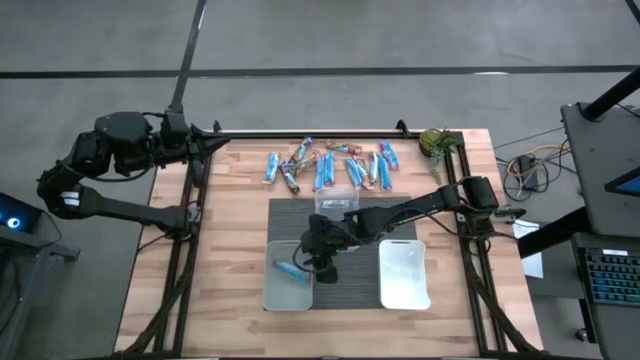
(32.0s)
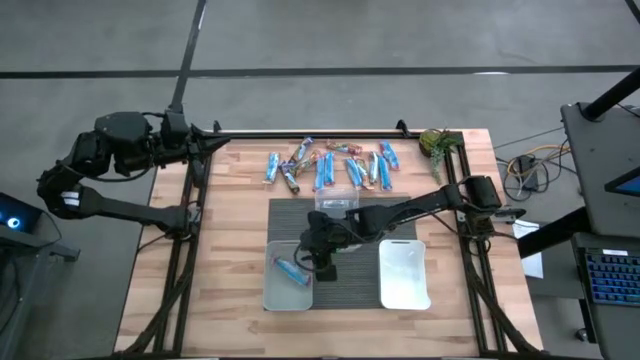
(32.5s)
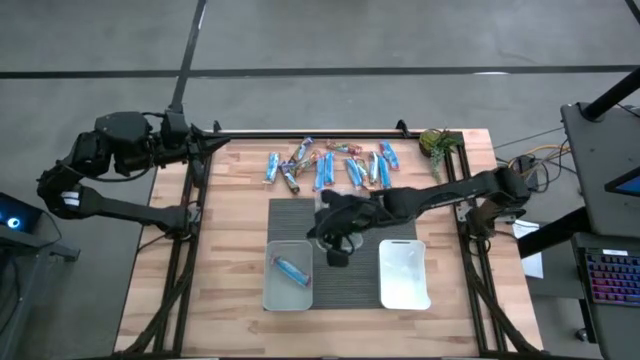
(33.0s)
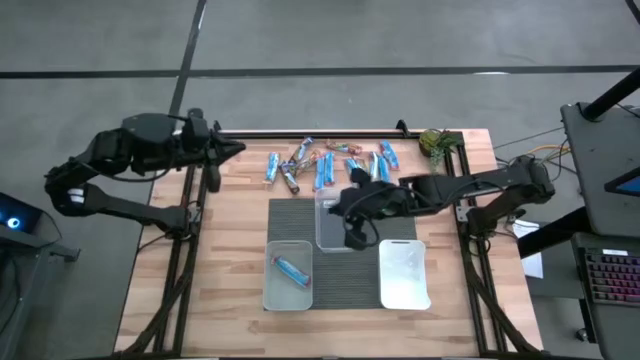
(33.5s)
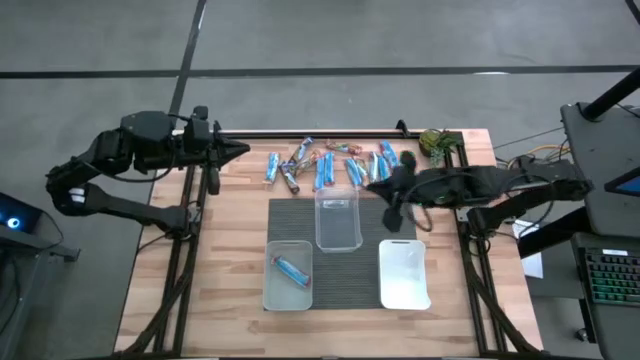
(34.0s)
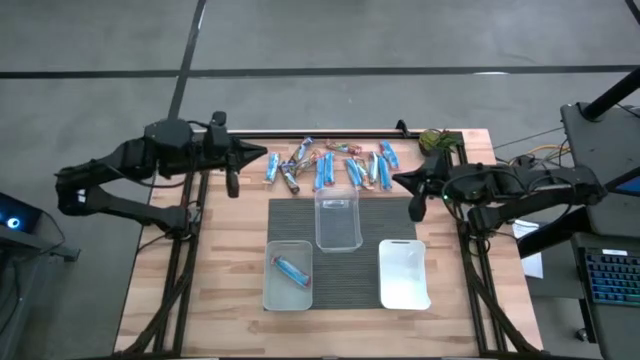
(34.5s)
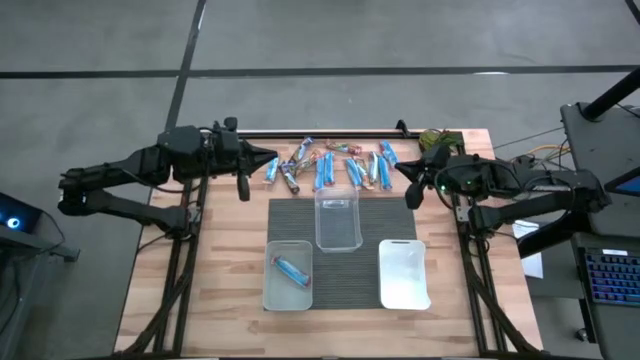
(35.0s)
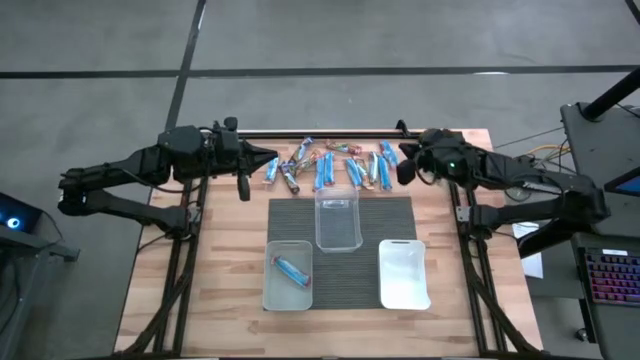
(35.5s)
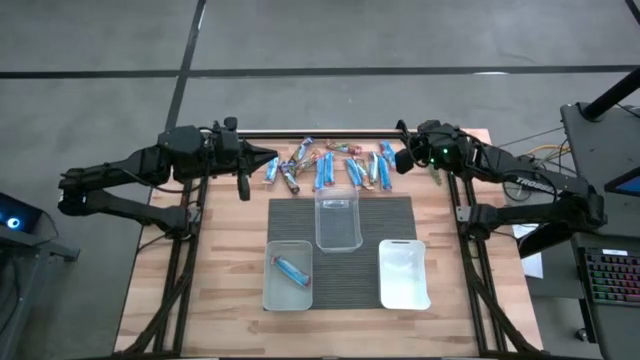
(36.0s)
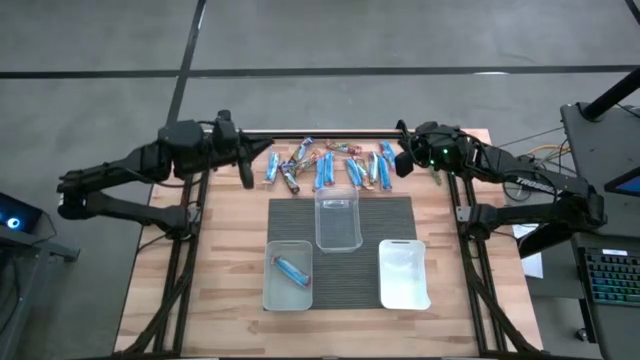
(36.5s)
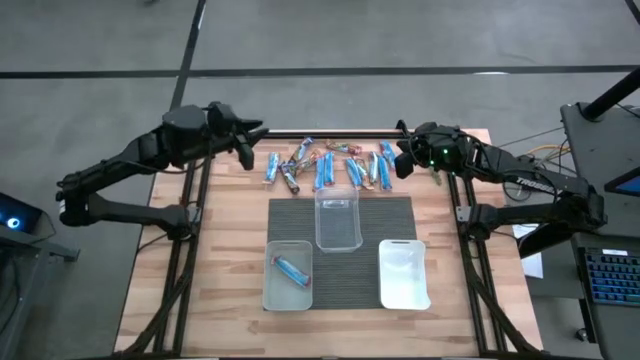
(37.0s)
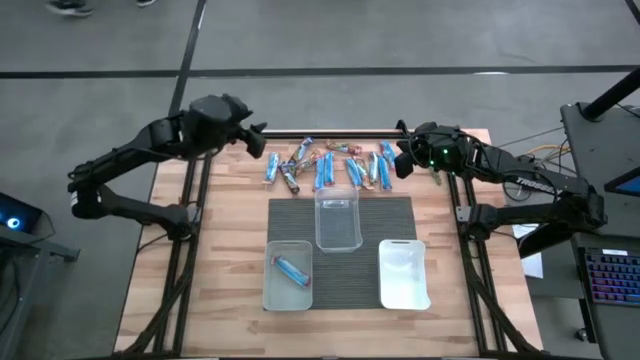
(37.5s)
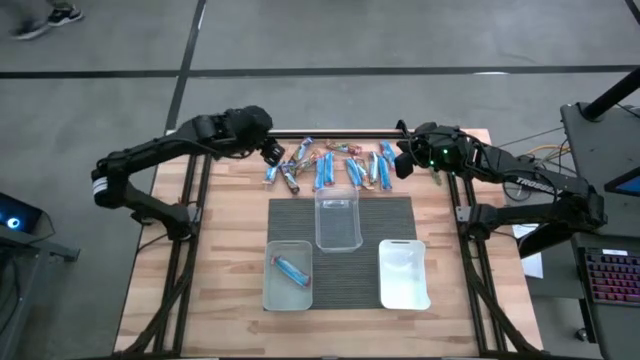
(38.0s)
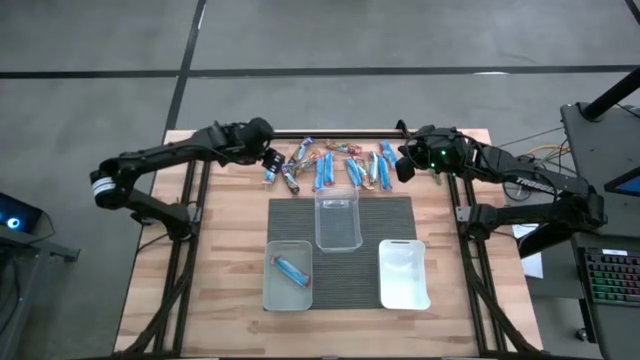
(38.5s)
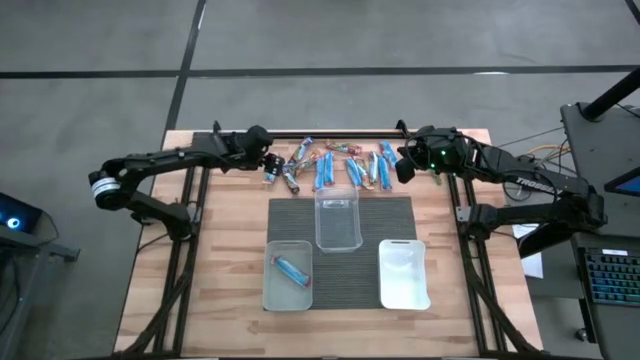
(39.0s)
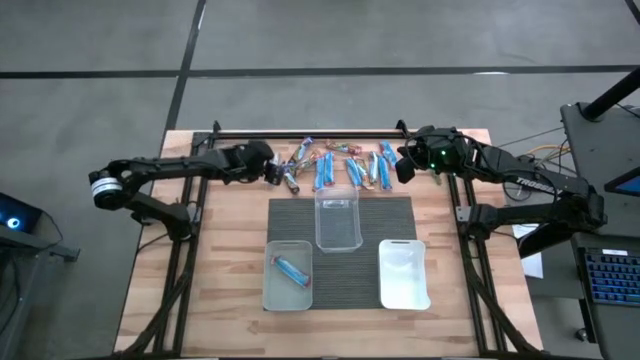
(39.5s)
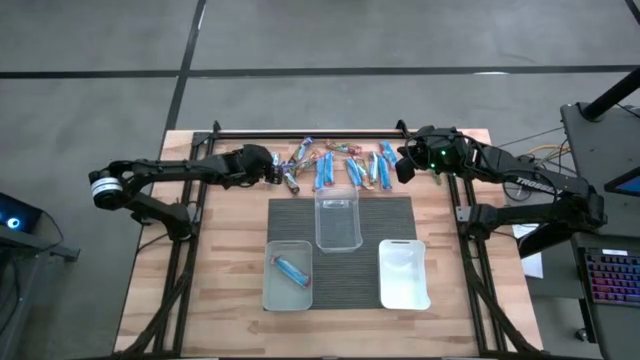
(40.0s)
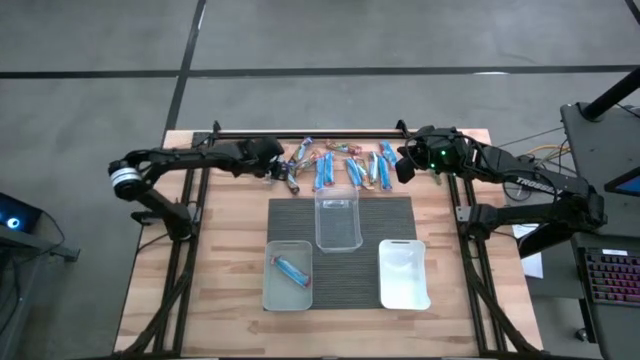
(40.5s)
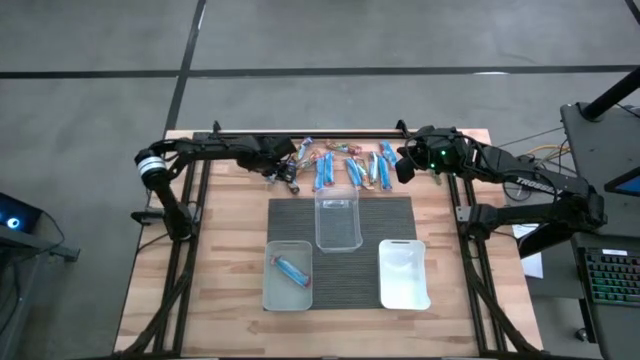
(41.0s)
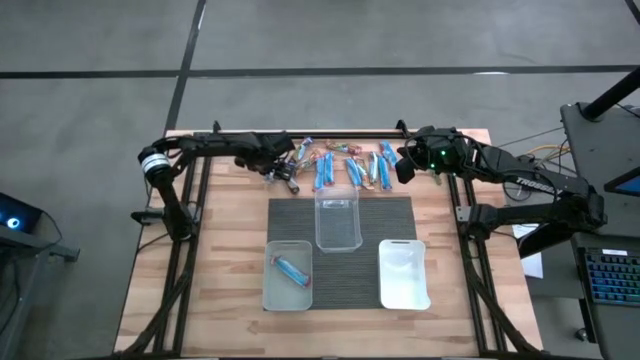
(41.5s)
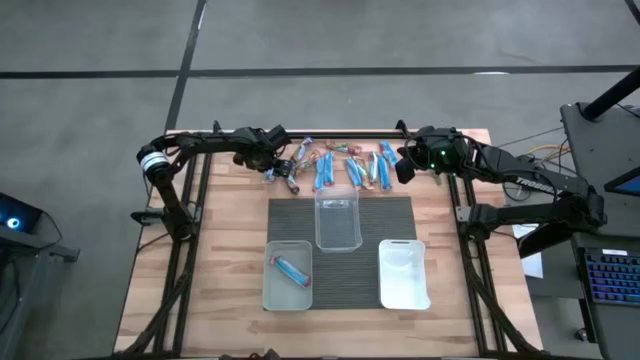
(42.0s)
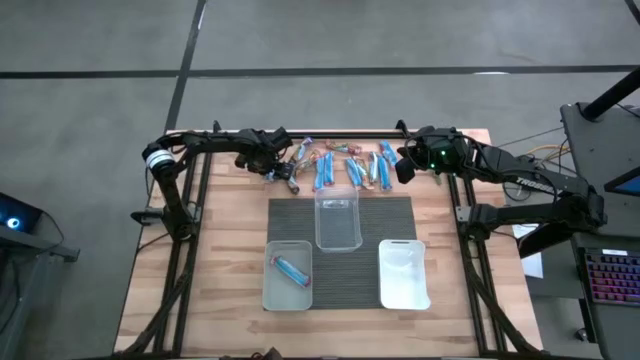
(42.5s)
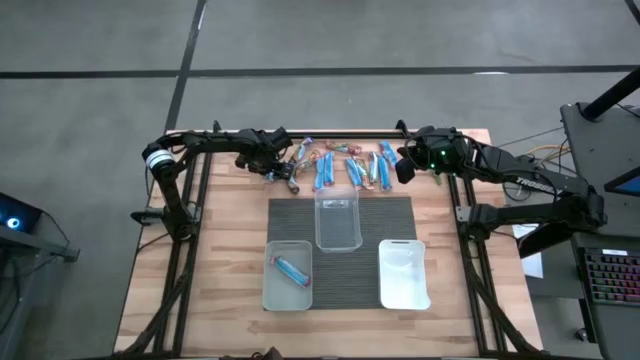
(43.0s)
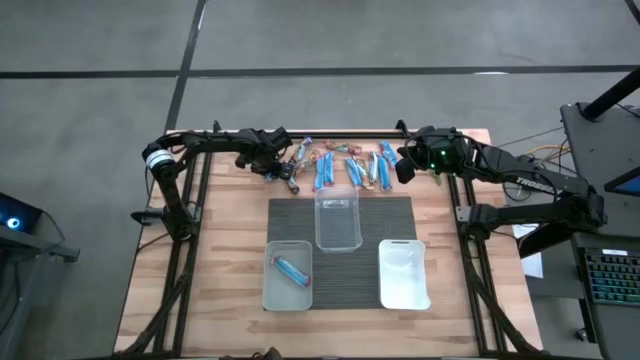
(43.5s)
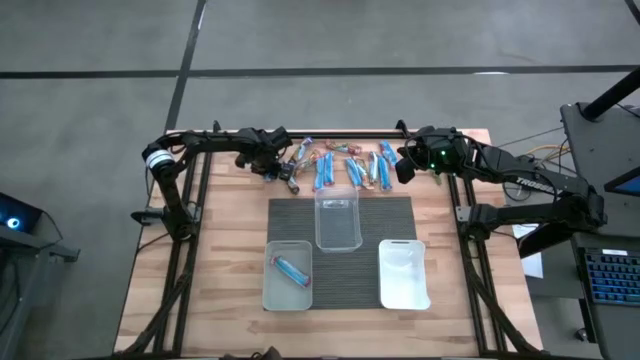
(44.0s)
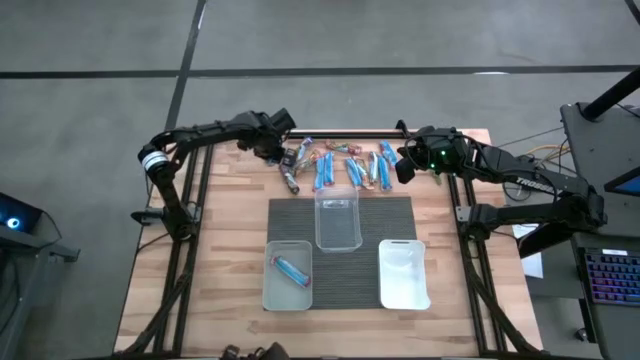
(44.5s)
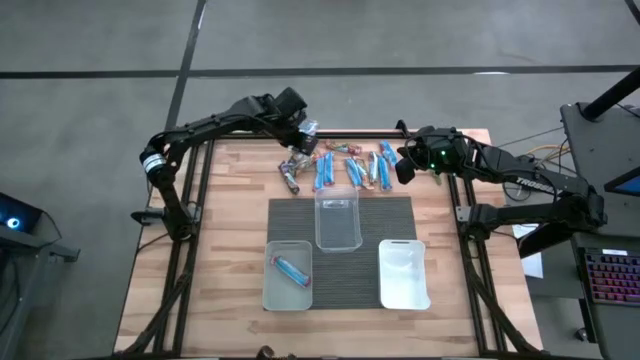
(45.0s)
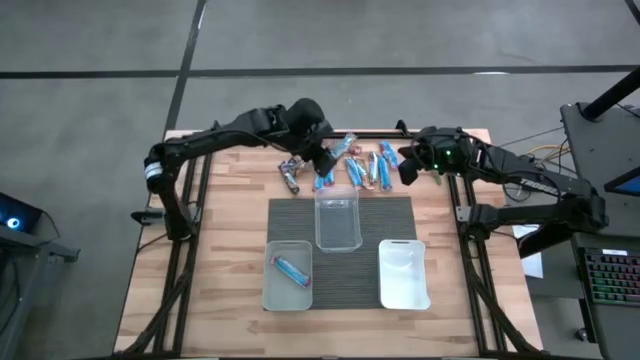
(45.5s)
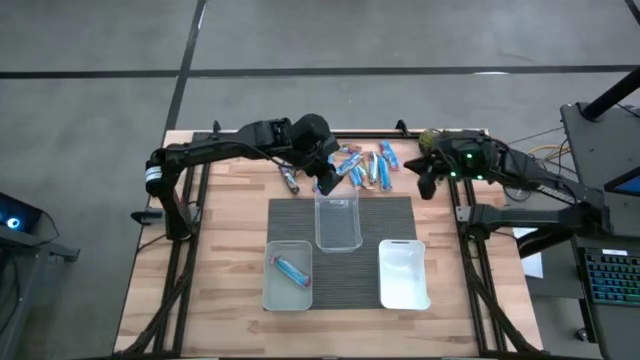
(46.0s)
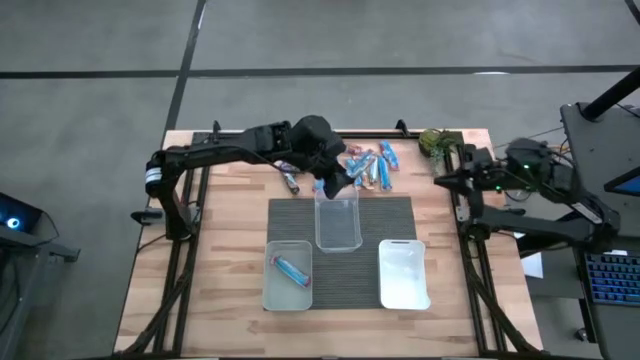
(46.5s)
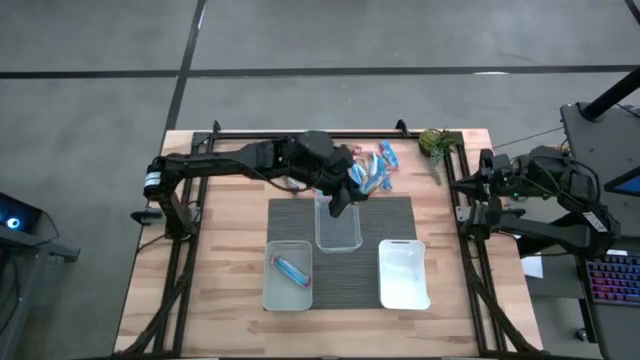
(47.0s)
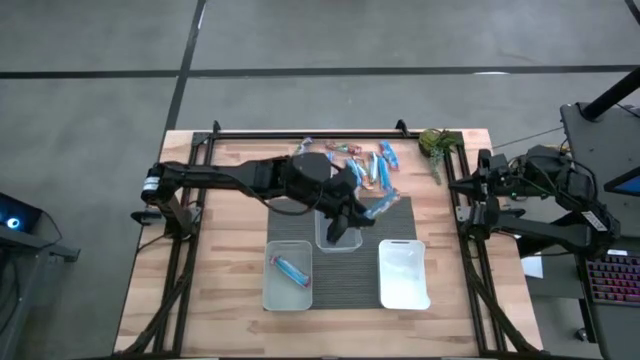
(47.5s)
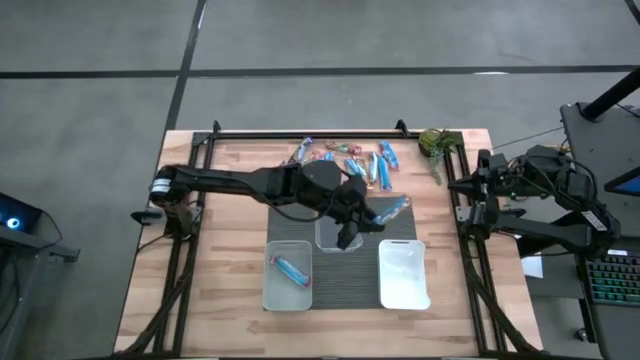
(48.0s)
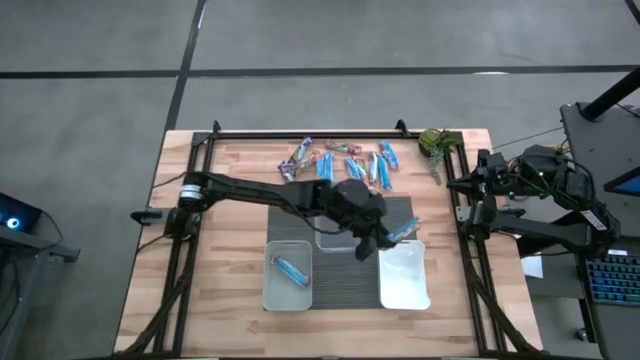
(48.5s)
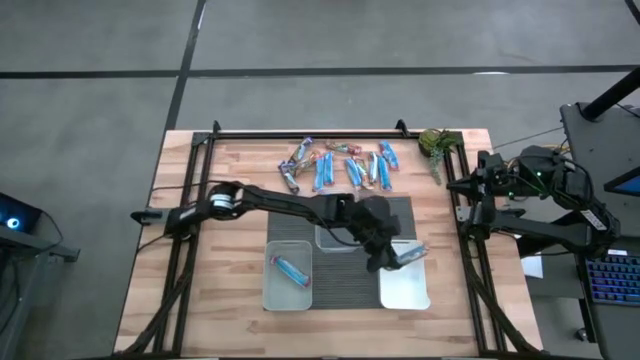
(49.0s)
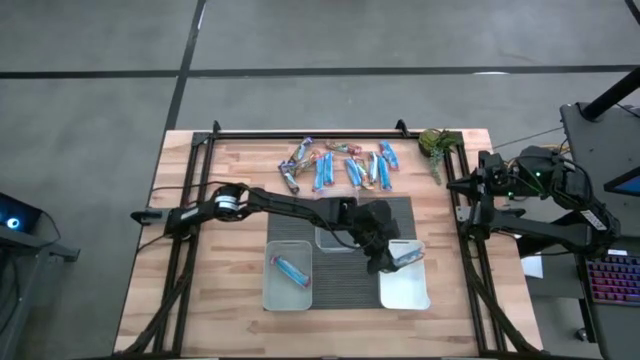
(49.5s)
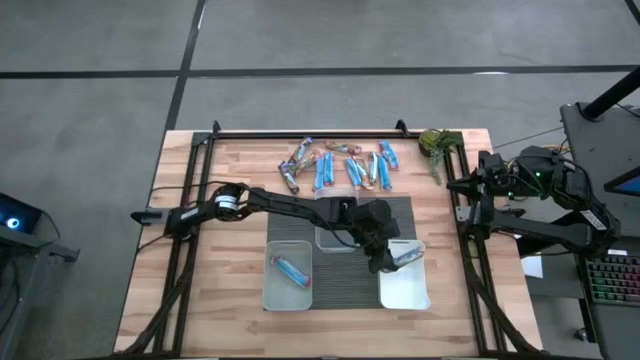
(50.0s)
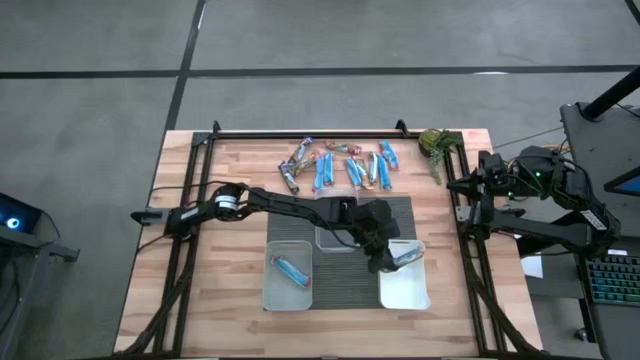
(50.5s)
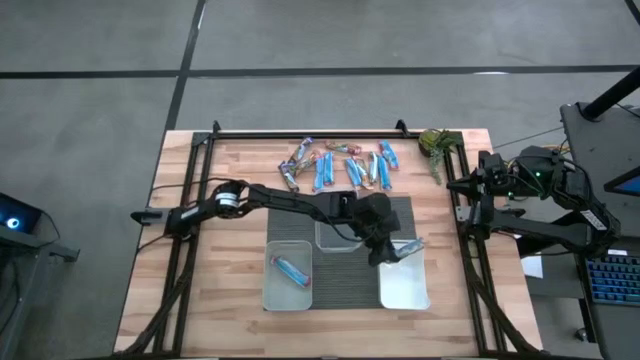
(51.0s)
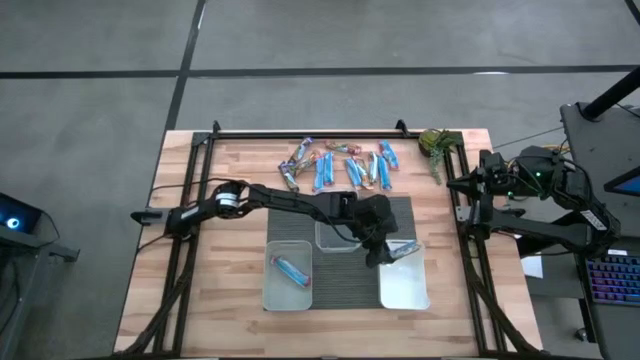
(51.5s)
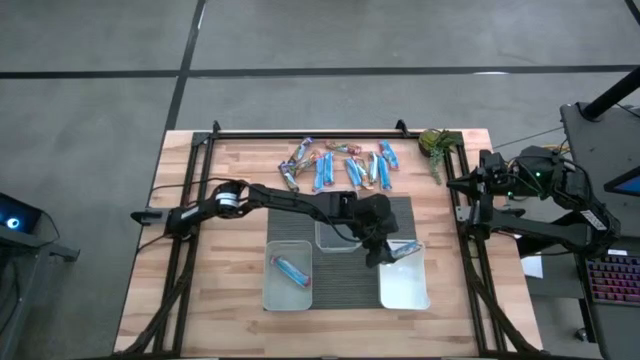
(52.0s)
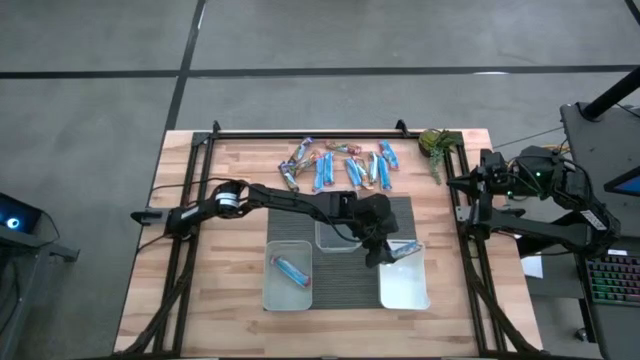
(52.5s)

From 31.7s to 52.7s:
Task: Pick and place Granola Bars by type
Put the orange granola bar into the white bin
